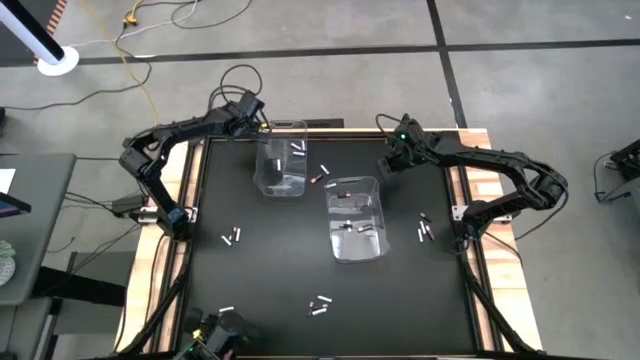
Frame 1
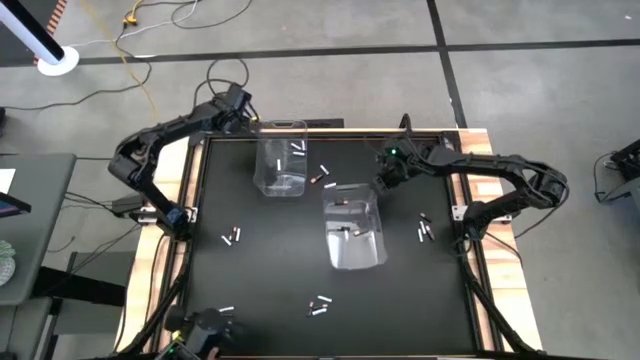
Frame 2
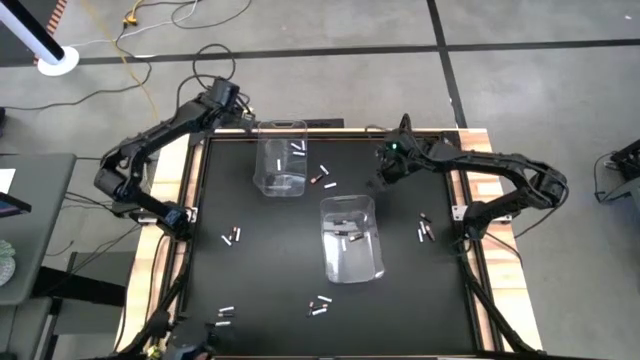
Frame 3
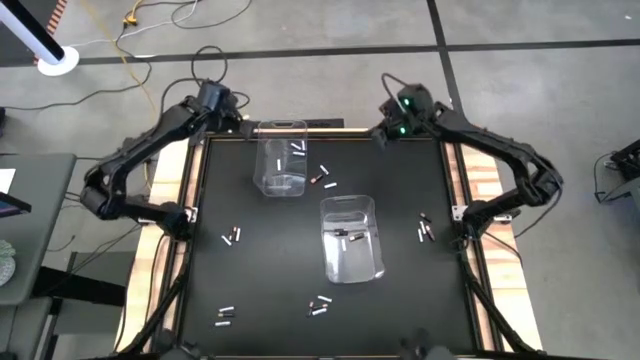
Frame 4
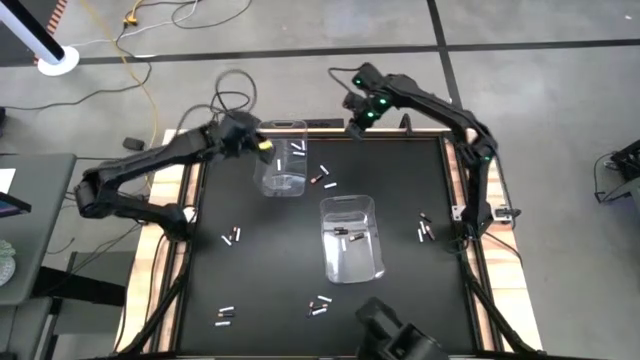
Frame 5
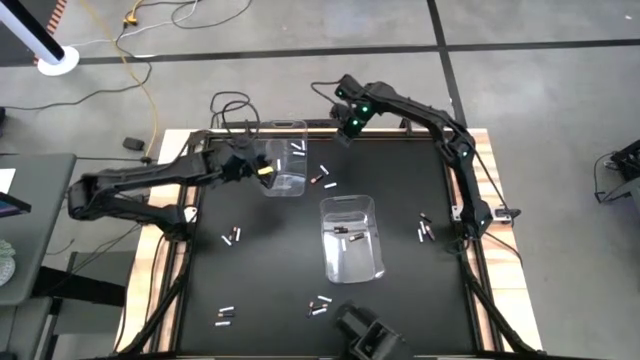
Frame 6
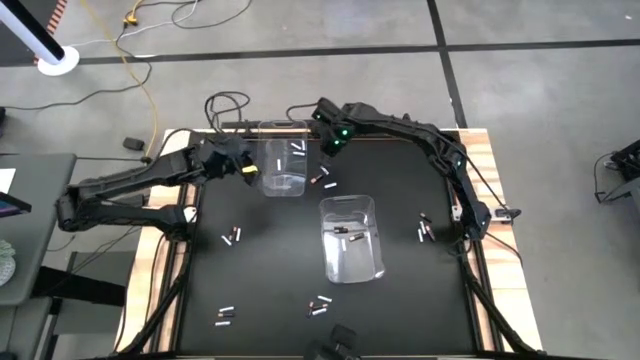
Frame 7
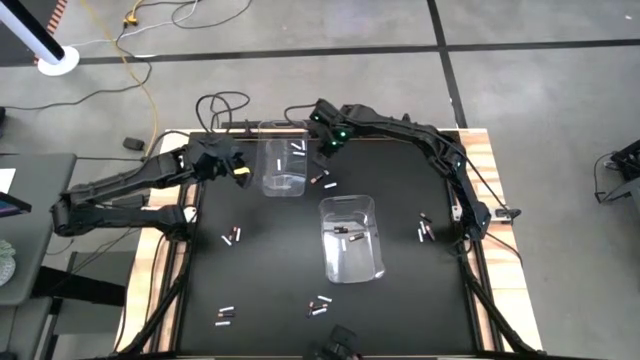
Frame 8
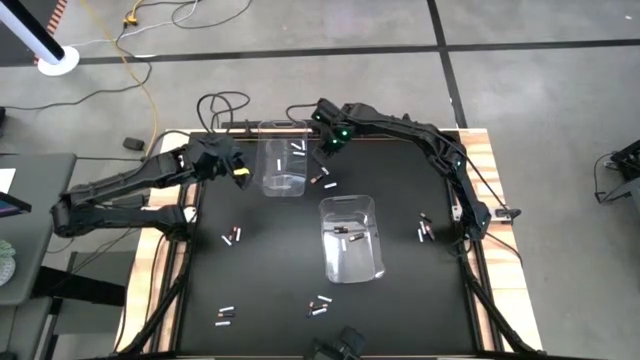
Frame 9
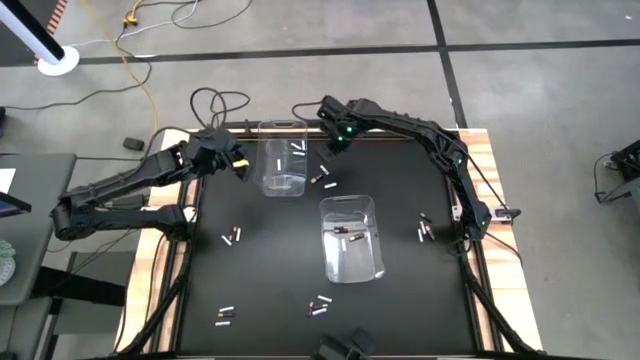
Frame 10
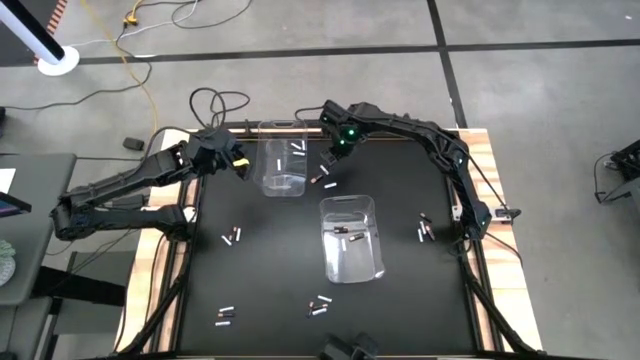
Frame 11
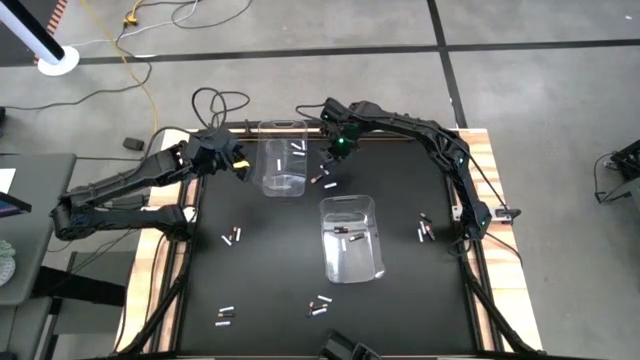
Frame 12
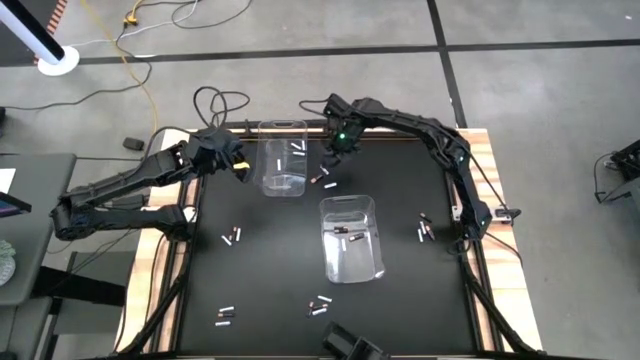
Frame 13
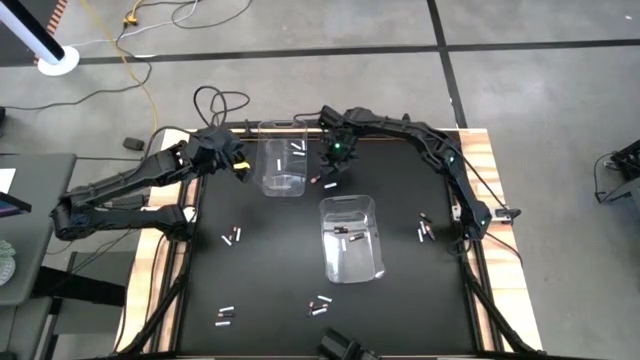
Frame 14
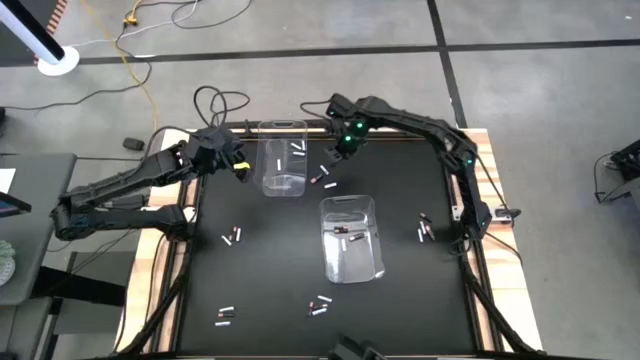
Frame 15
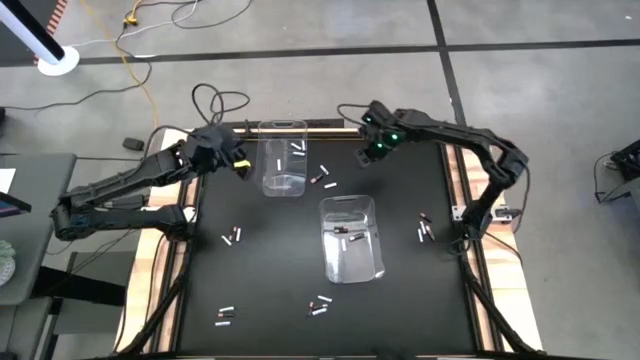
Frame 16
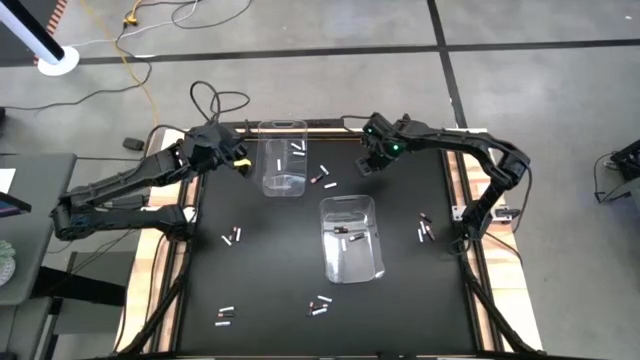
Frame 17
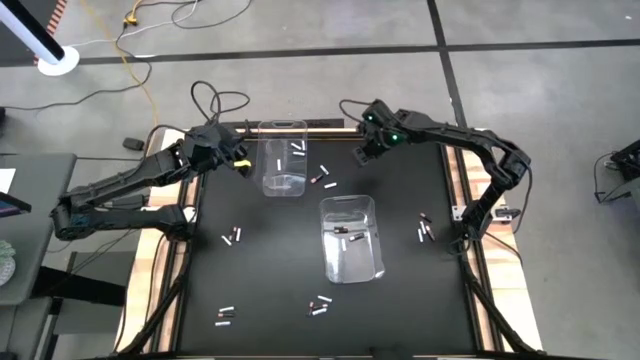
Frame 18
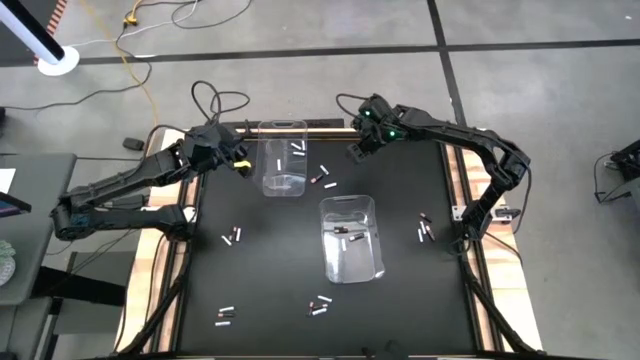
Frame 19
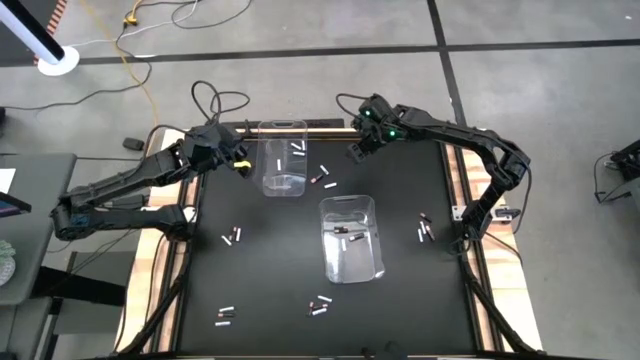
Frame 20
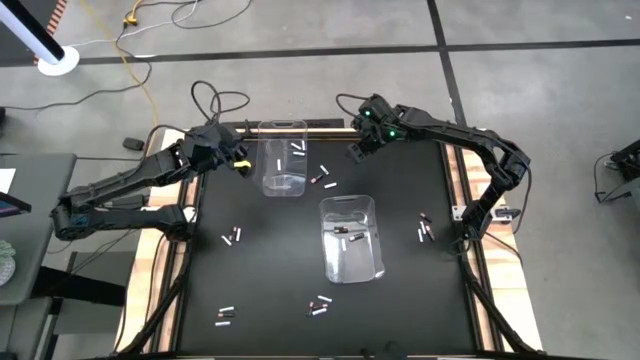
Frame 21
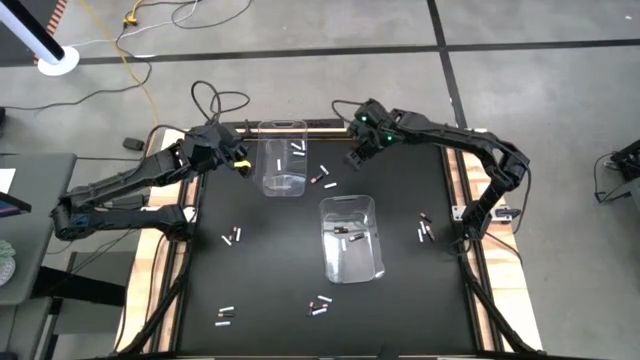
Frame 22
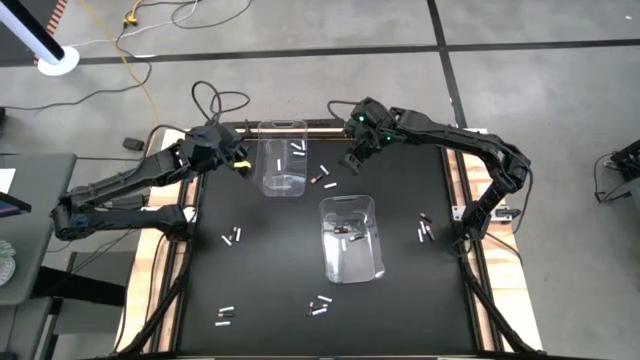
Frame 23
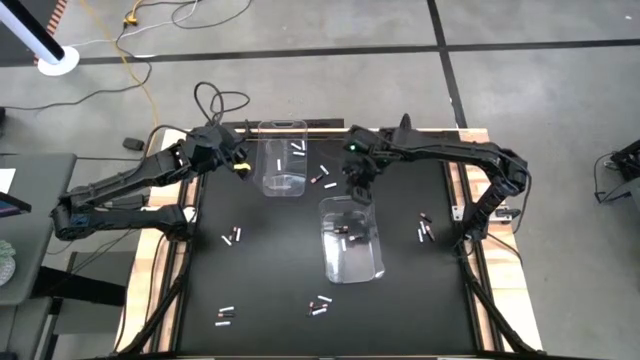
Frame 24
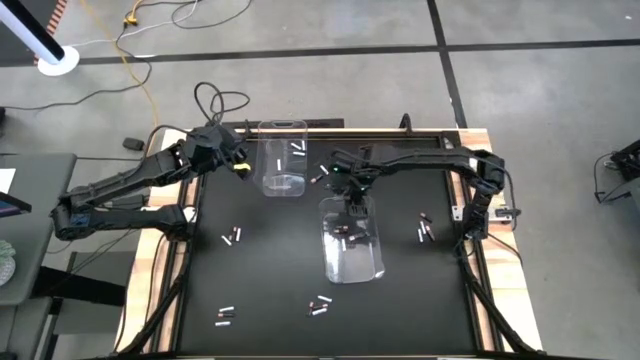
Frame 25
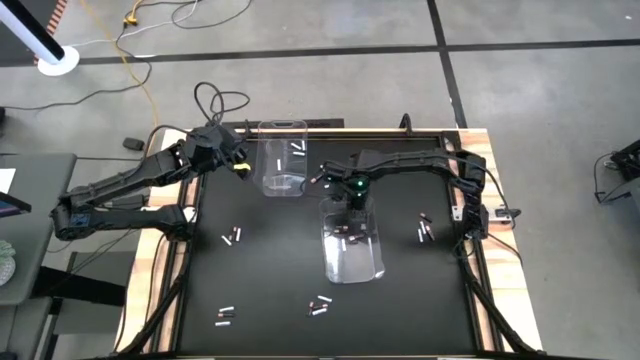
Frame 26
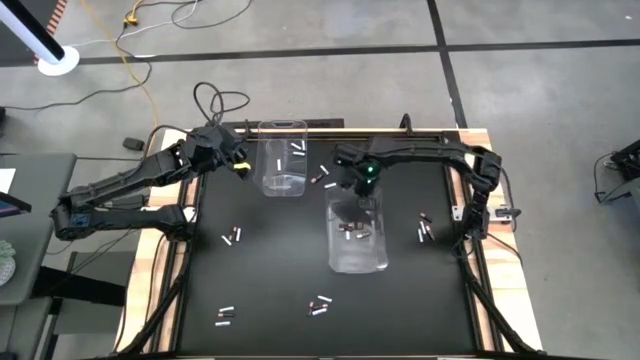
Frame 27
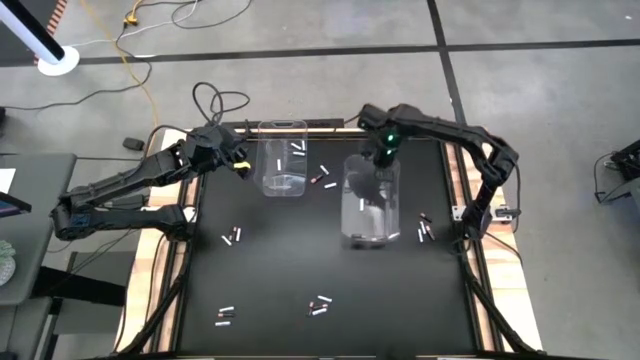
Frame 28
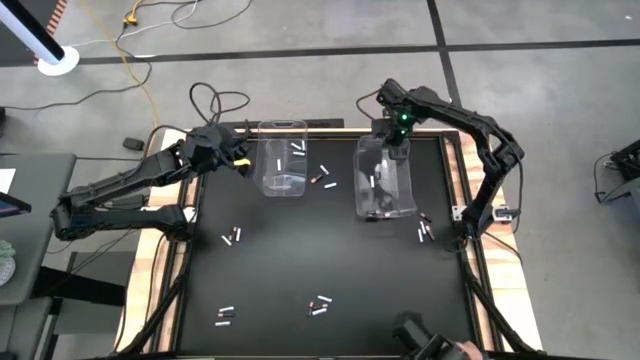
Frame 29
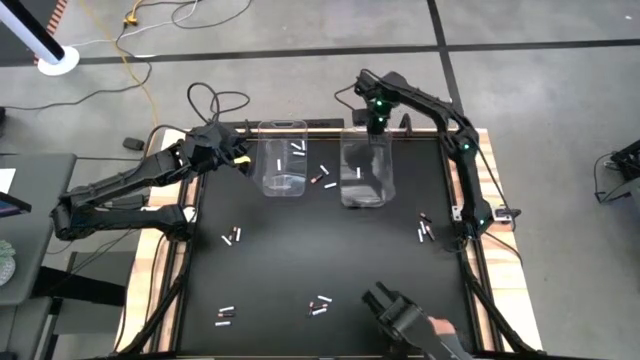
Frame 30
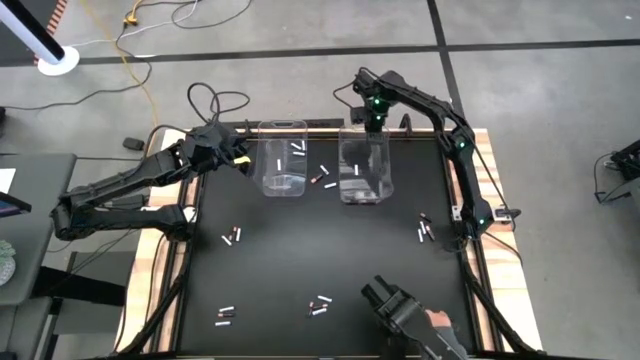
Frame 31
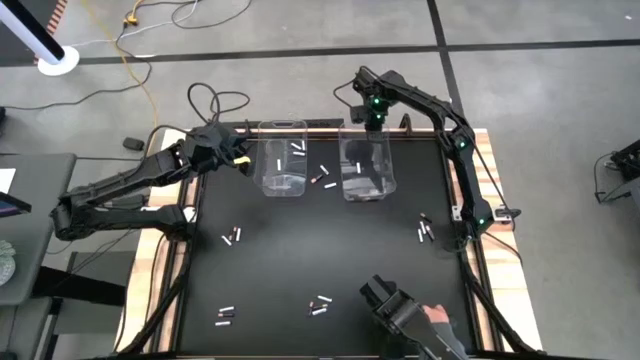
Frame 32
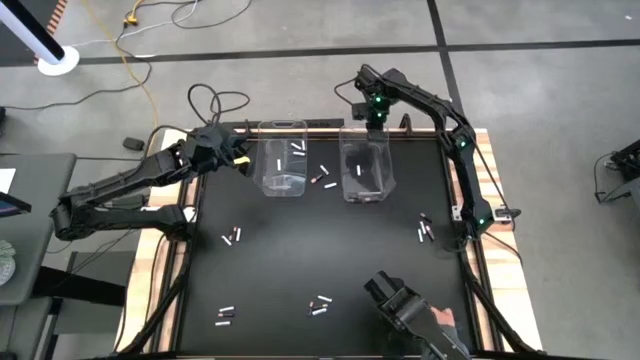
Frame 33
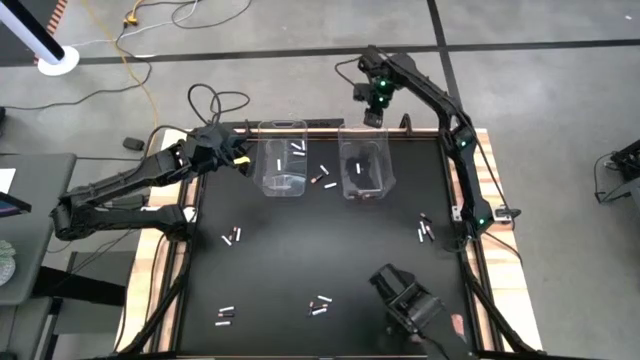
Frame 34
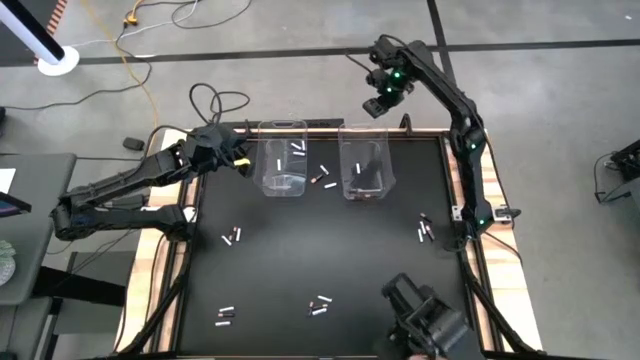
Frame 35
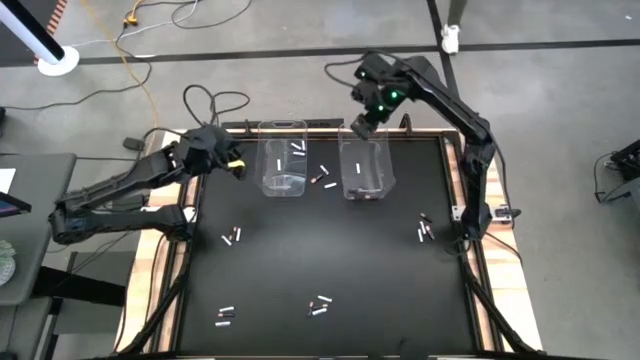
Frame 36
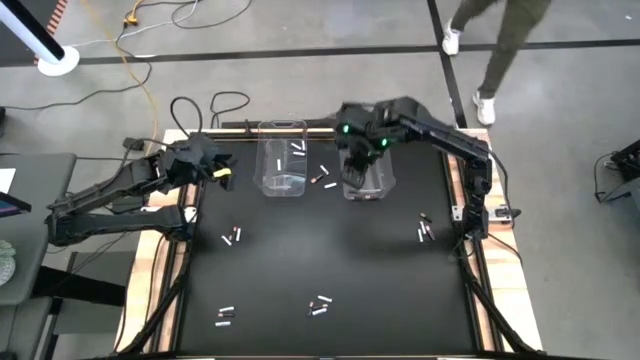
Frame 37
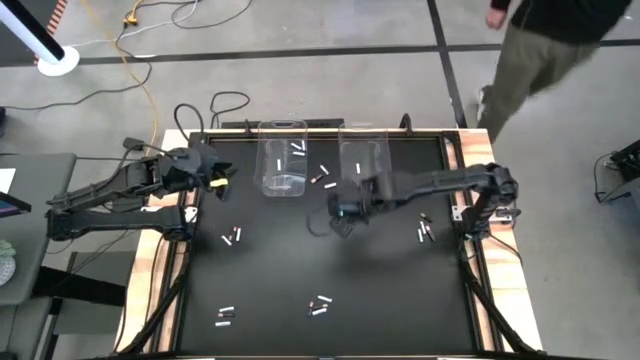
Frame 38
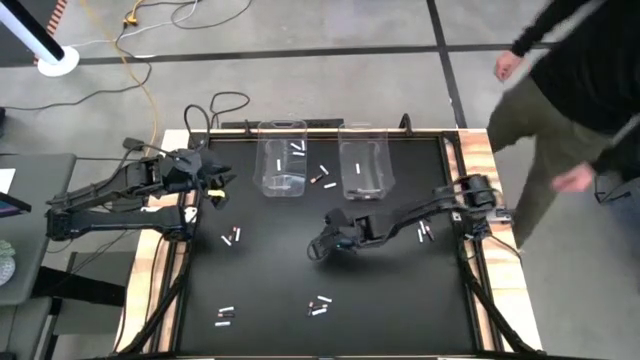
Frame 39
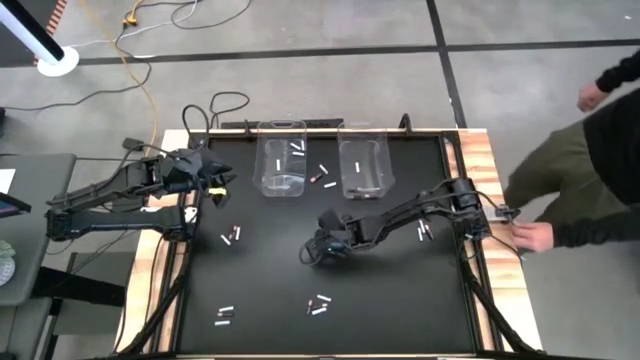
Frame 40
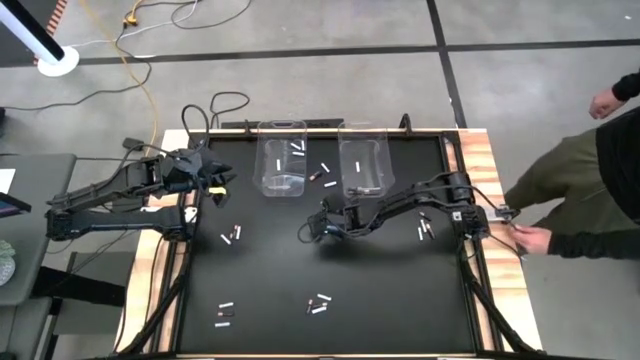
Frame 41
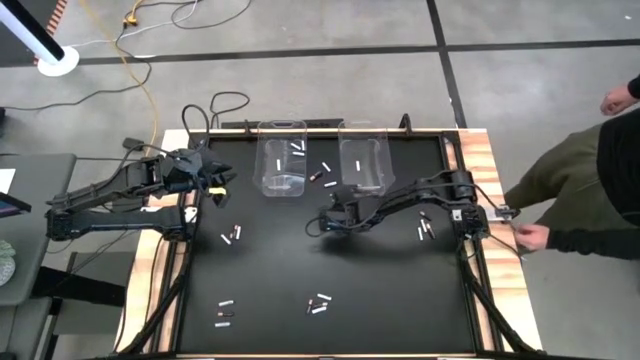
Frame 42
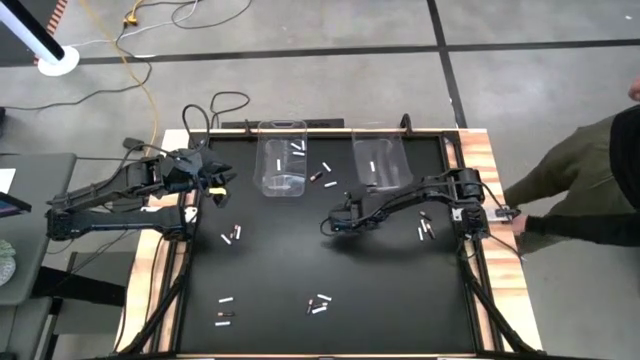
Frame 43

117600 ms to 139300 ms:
Task: Sort batteries
Move the bottom transparent bin to the top right of the table
